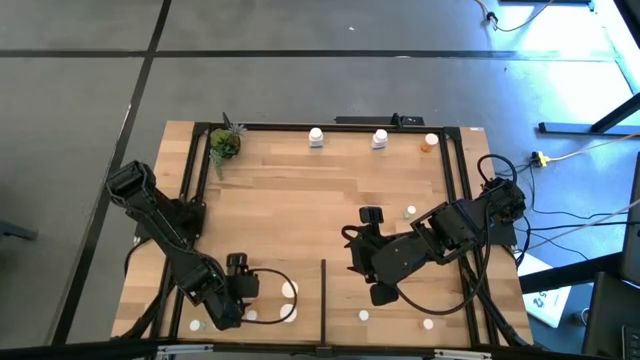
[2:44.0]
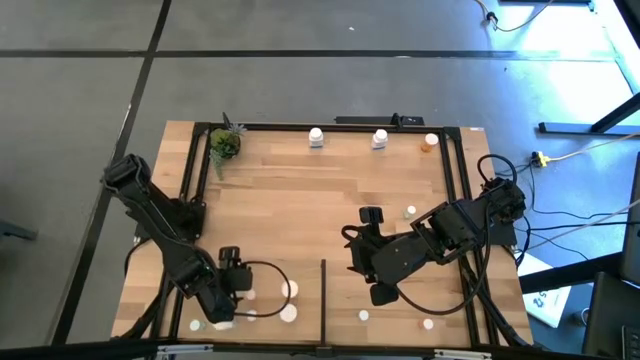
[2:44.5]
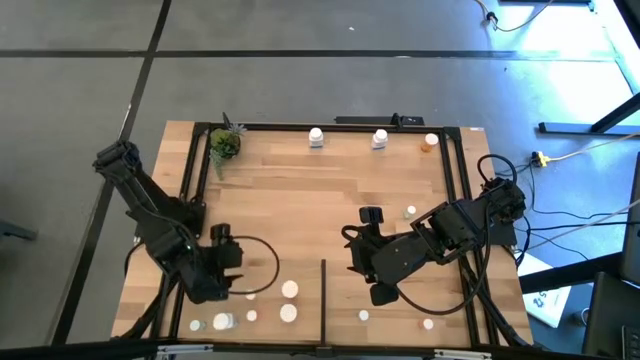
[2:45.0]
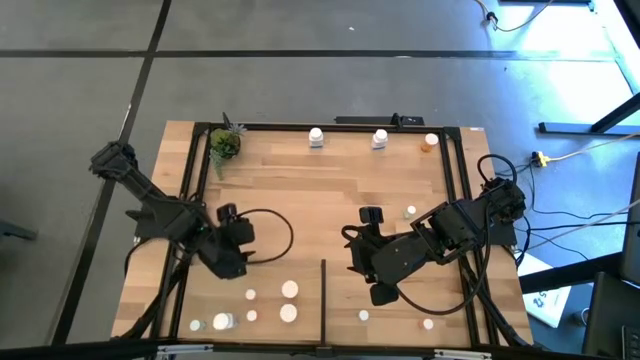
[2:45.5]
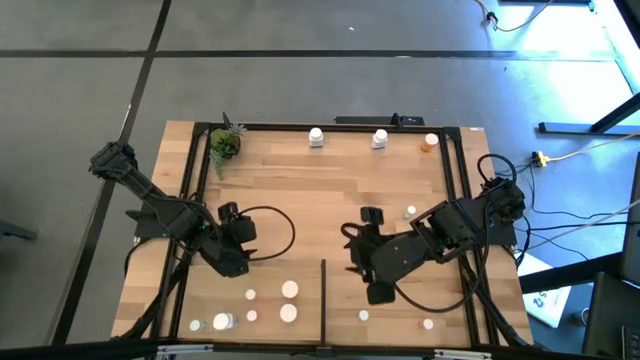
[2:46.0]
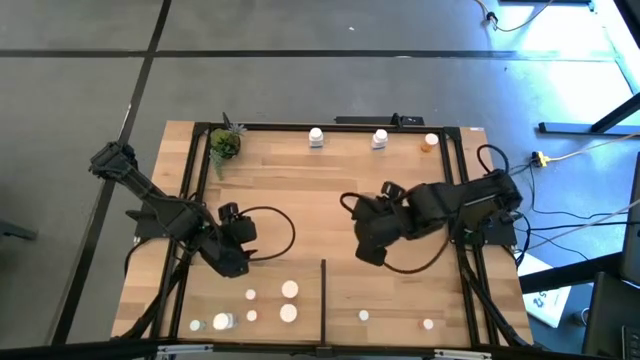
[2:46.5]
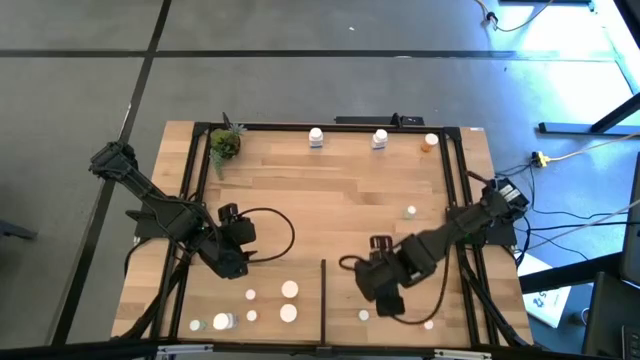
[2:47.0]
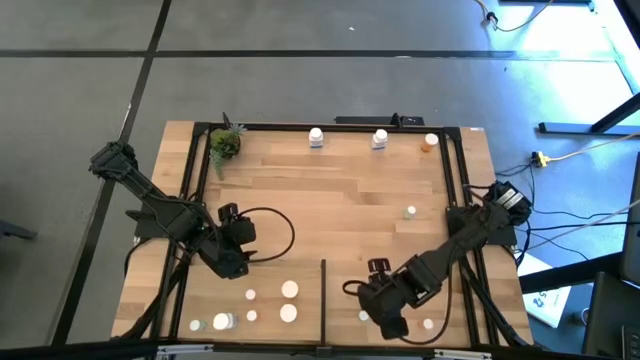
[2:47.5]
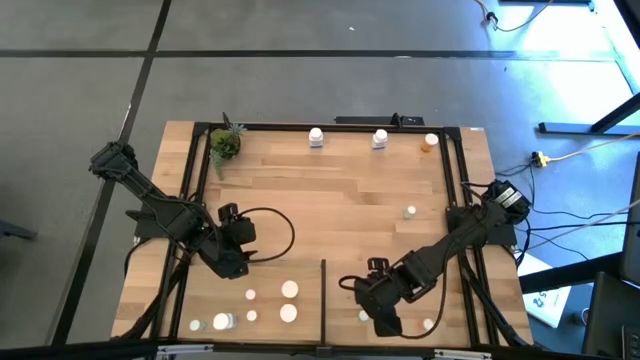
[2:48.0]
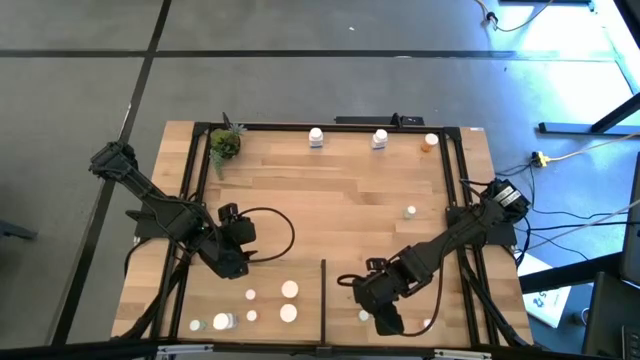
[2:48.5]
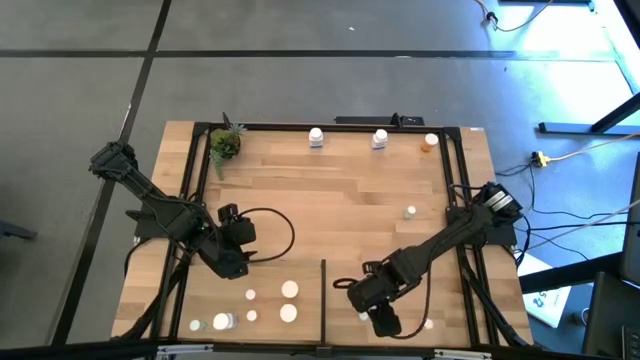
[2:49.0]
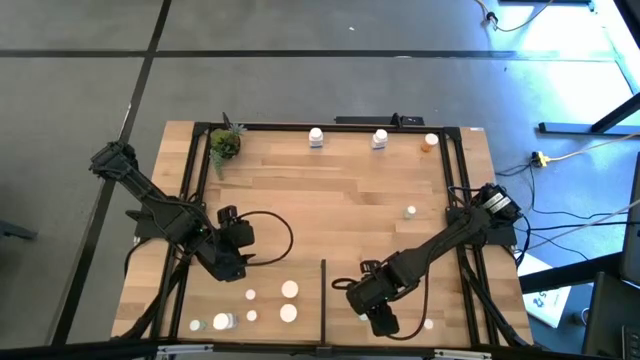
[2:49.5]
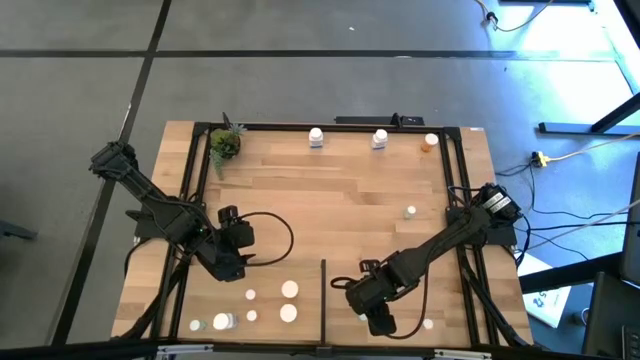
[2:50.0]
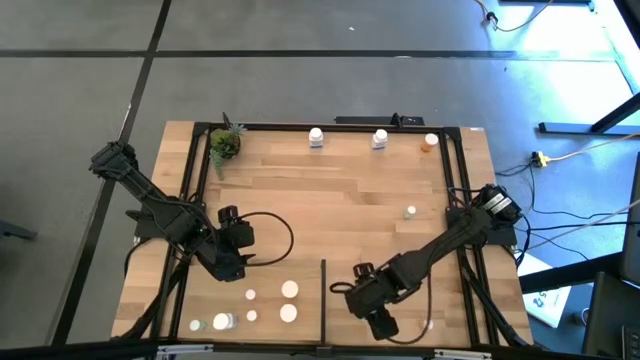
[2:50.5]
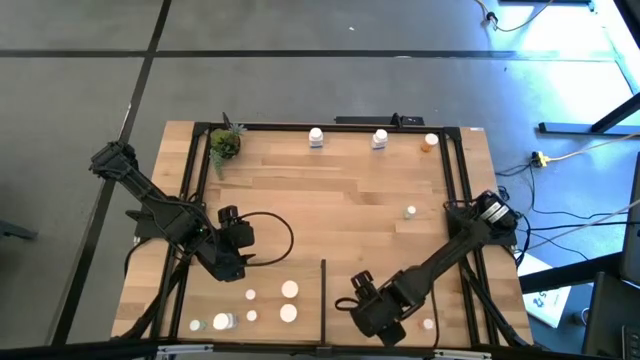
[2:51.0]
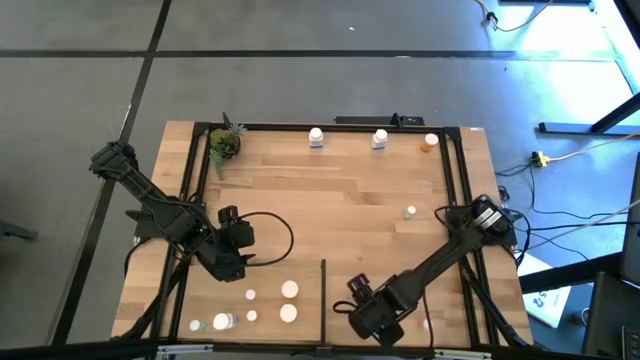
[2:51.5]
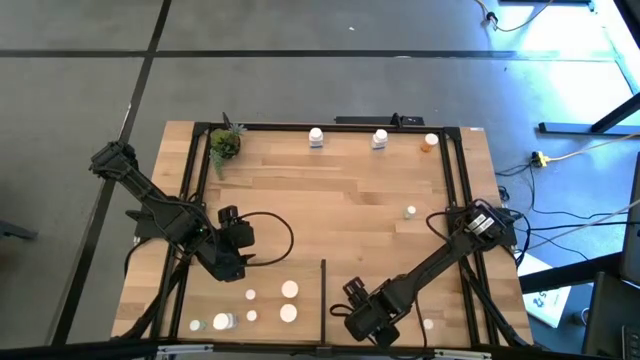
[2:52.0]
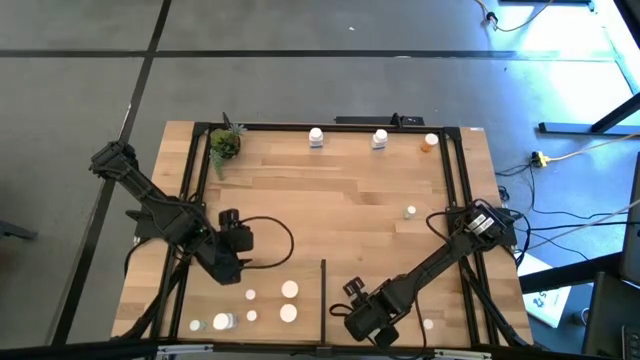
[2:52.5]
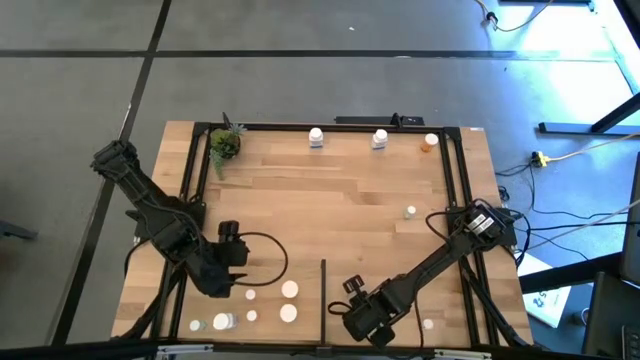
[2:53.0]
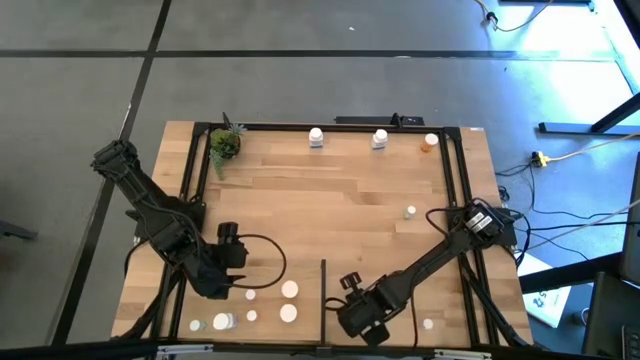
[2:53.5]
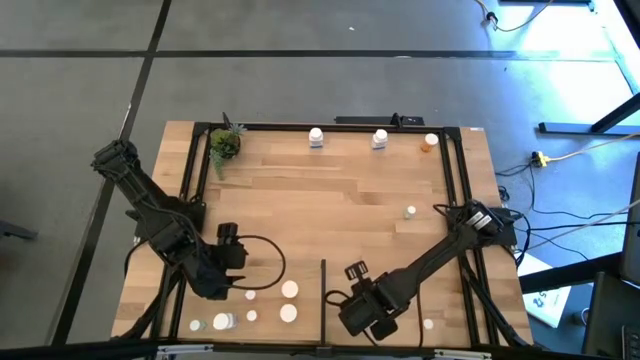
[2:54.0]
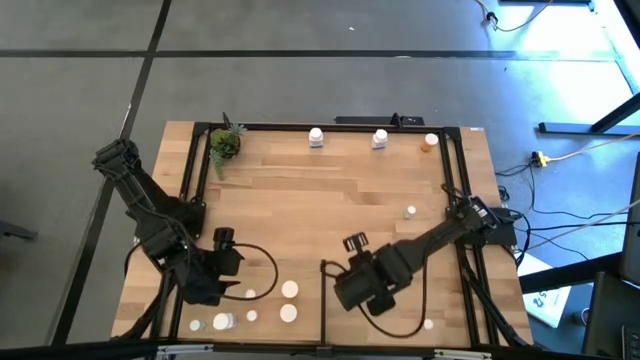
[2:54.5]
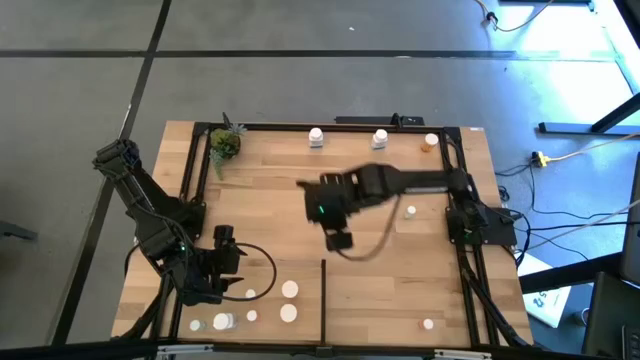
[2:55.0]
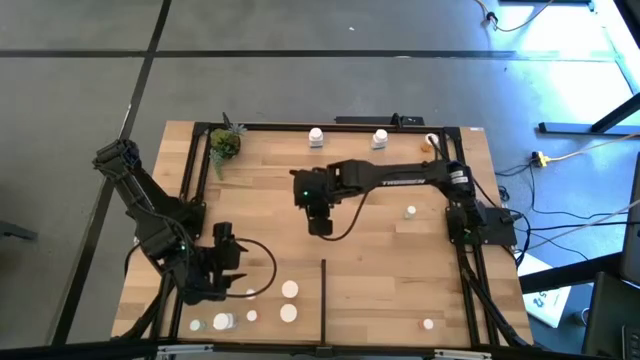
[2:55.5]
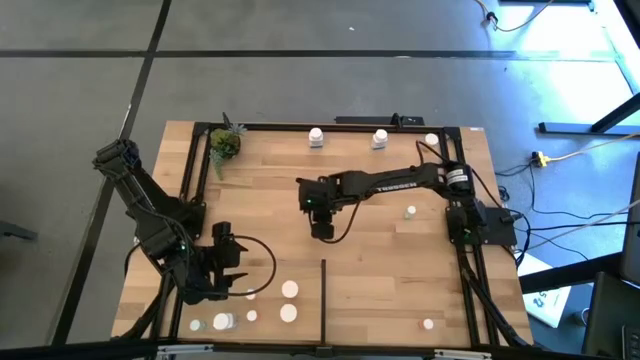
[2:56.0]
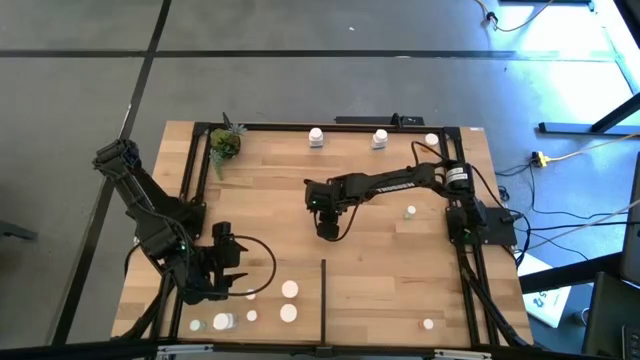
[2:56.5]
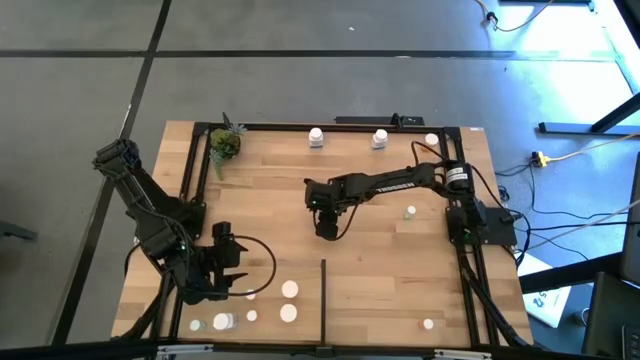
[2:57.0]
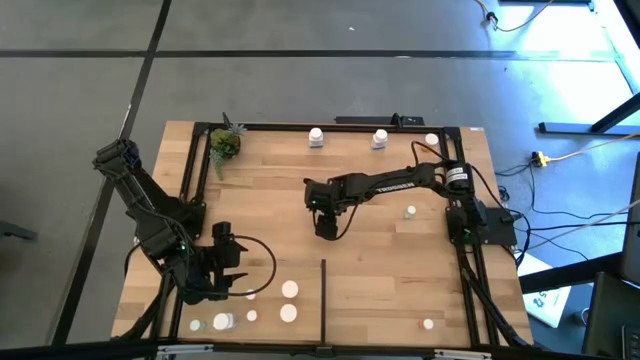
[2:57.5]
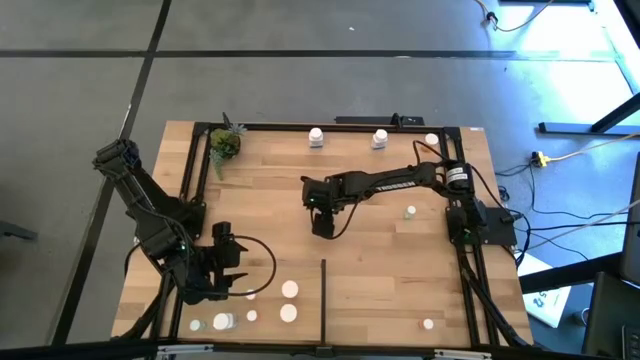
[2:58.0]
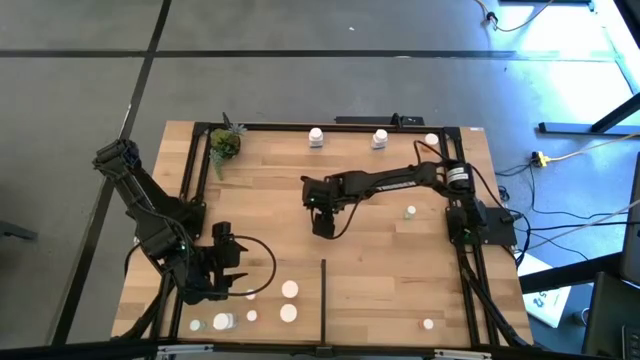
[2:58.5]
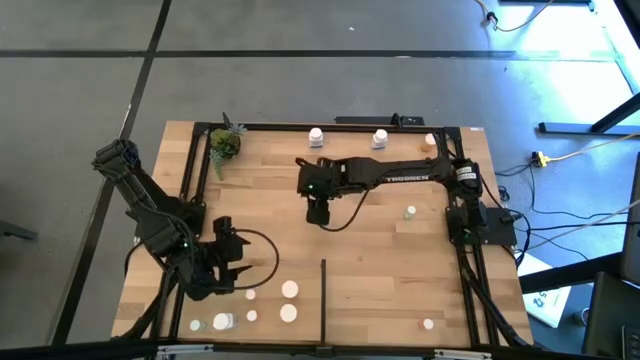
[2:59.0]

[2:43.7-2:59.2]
Task: Pick and place medicine bottles onto shelf by color
Put the bottom green pill bottle on the shelf aligned with the other green pill bottle

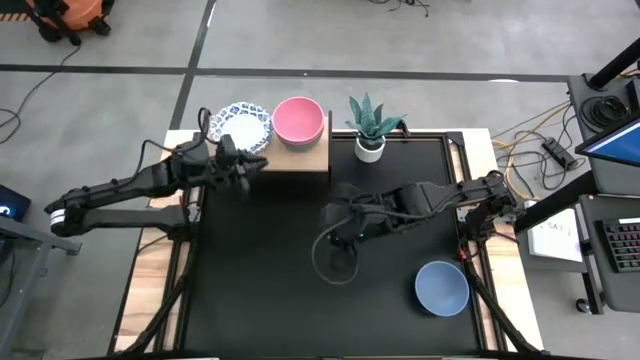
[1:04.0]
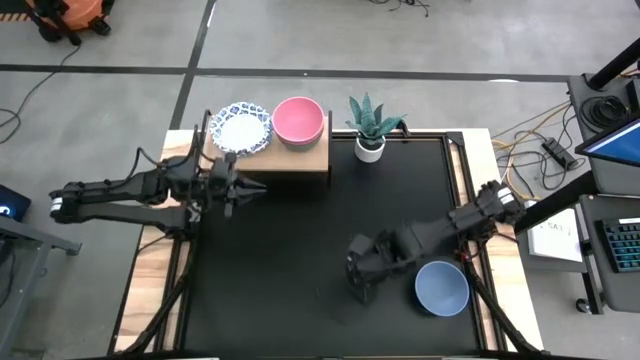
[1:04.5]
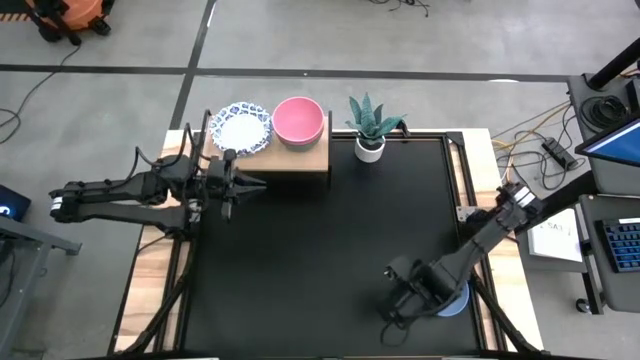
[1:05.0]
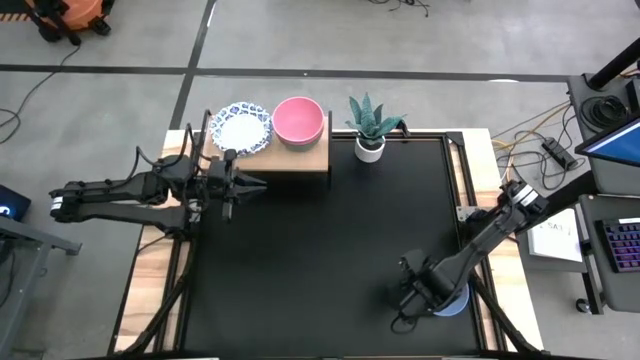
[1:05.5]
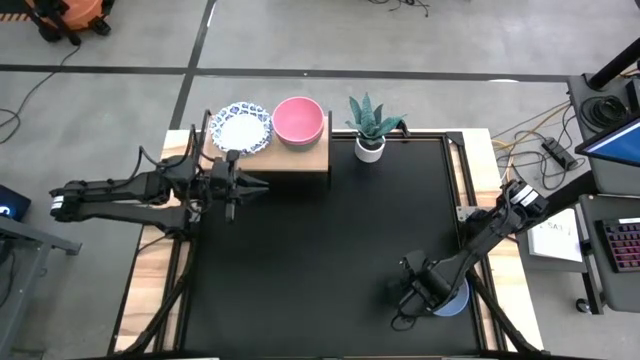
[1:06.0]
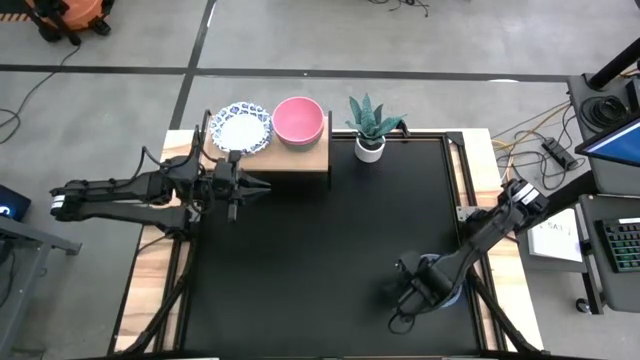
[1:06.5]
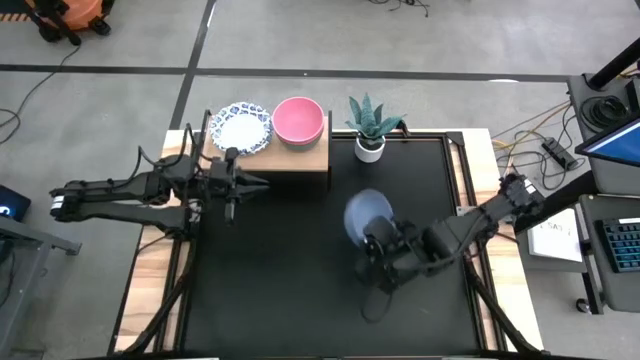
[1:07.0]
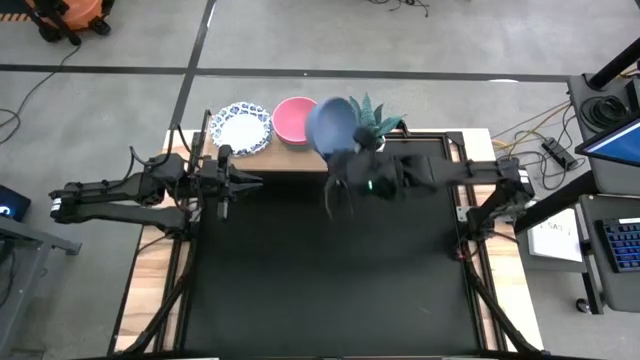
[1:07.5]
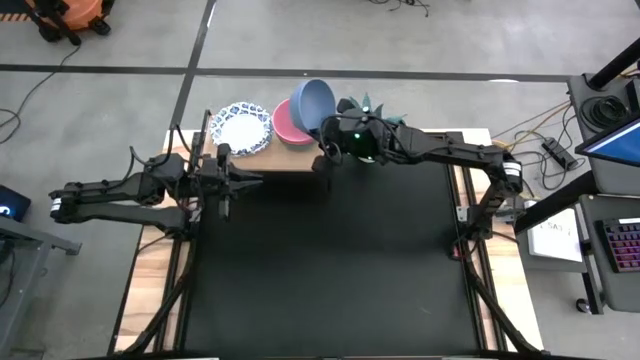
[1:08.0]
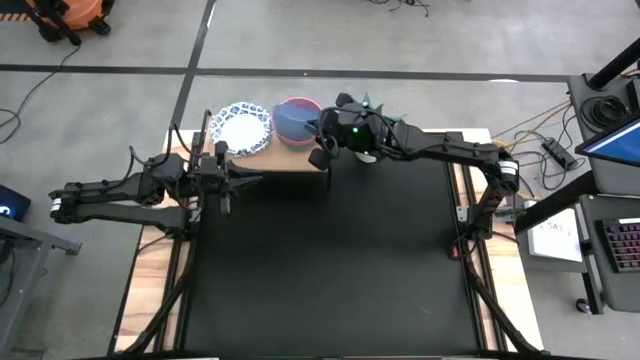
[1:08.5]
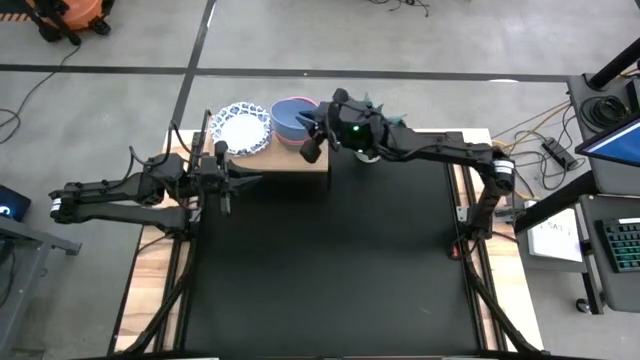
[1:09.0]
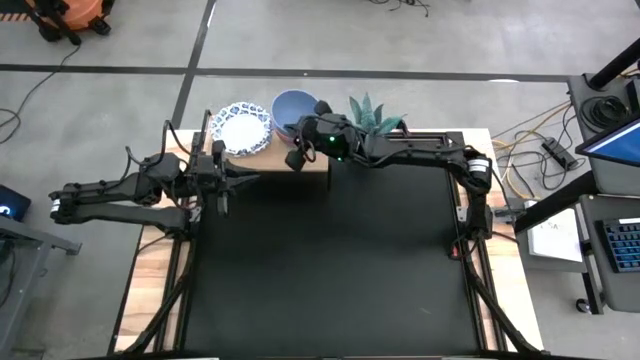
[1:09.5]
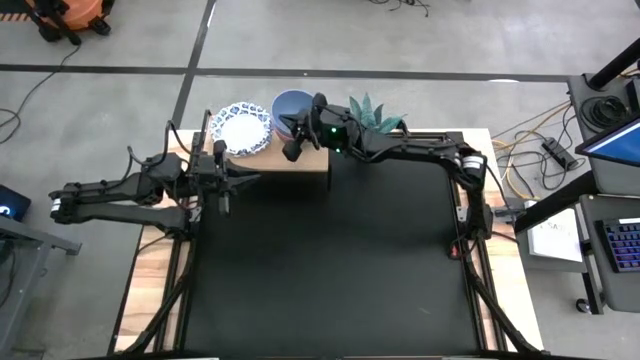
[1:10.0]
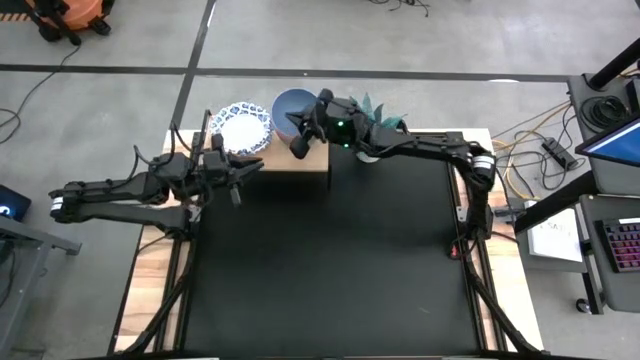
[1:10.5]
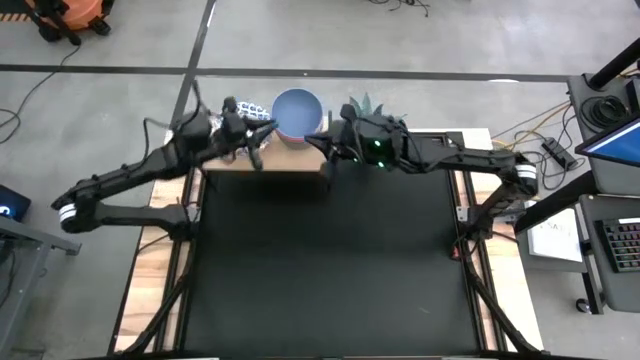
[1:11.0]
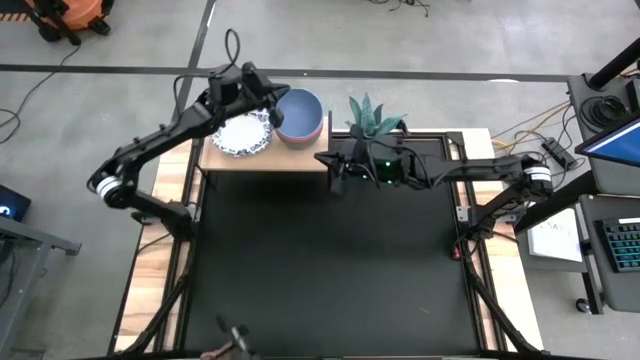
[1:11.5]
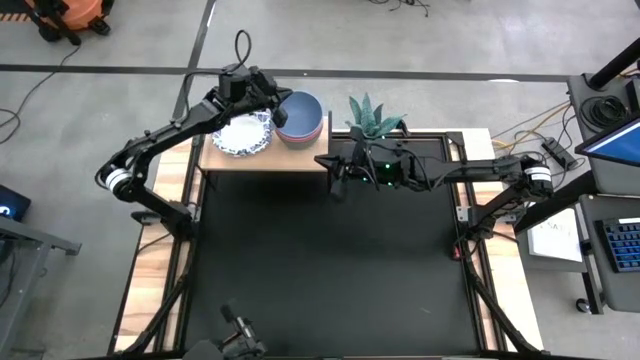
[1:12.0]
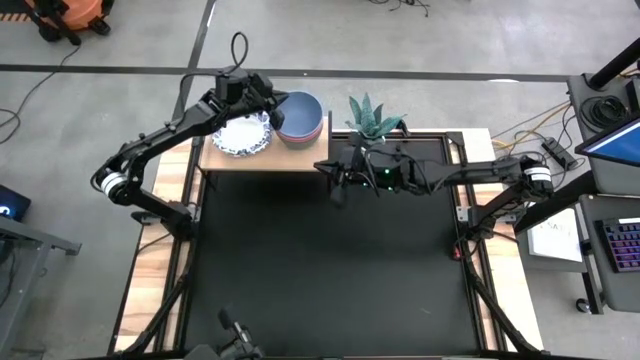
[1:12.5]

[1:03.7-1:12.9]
Task: Place and stack bowls onto a shelf
Stack the blue bowl on top of the pink bowl on the shelf
